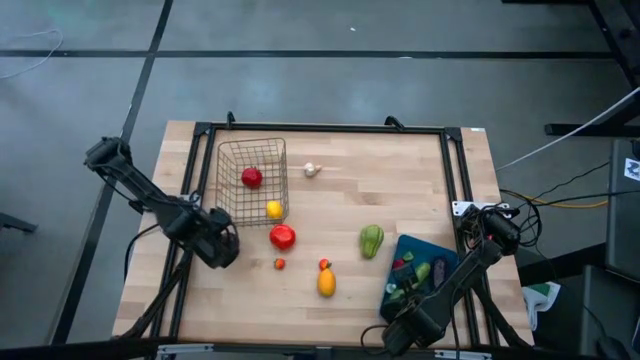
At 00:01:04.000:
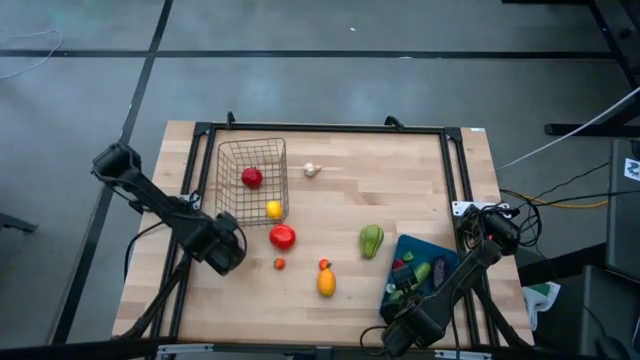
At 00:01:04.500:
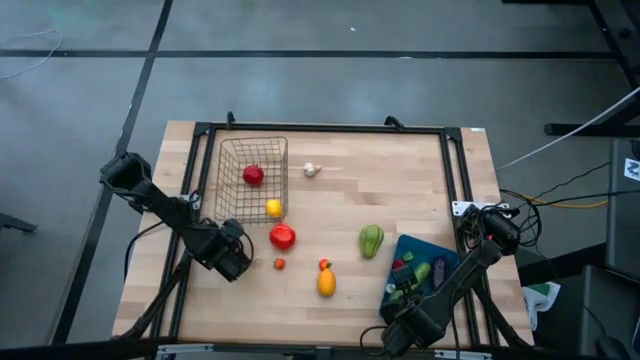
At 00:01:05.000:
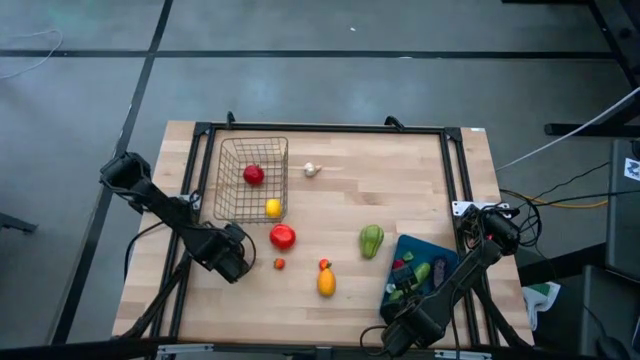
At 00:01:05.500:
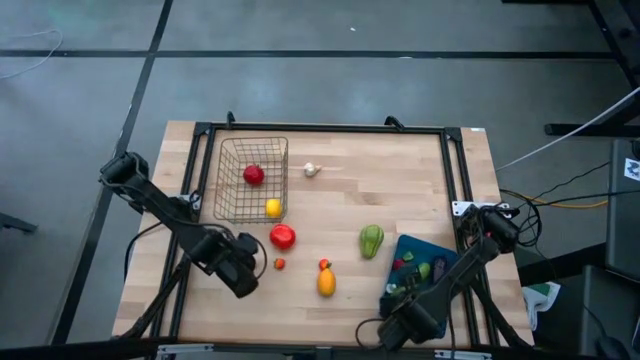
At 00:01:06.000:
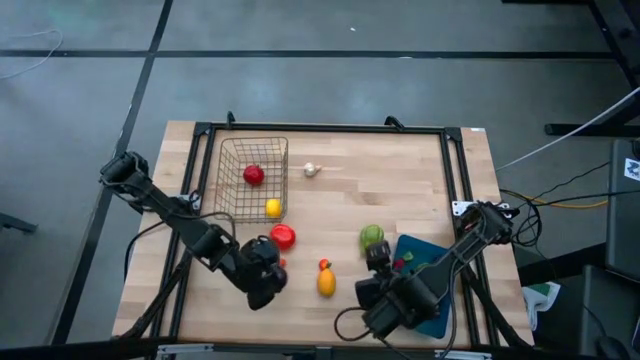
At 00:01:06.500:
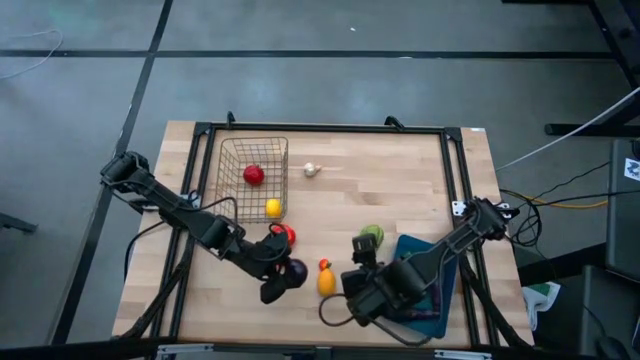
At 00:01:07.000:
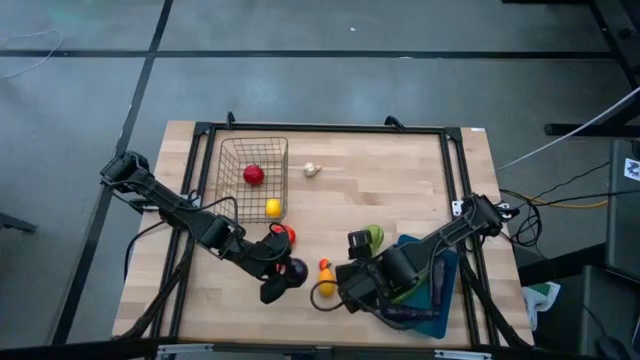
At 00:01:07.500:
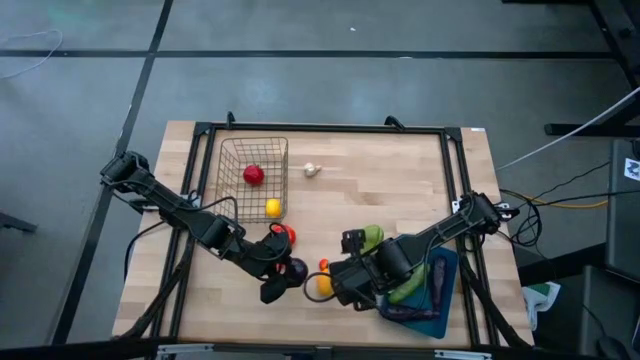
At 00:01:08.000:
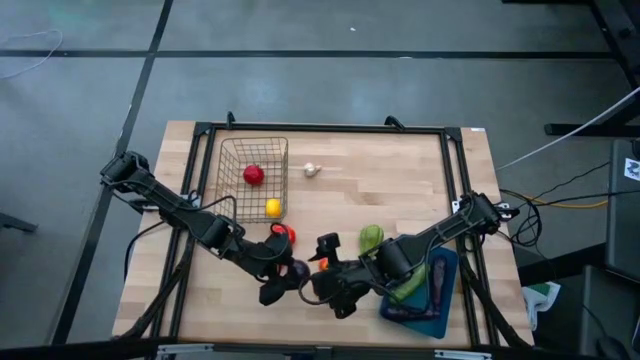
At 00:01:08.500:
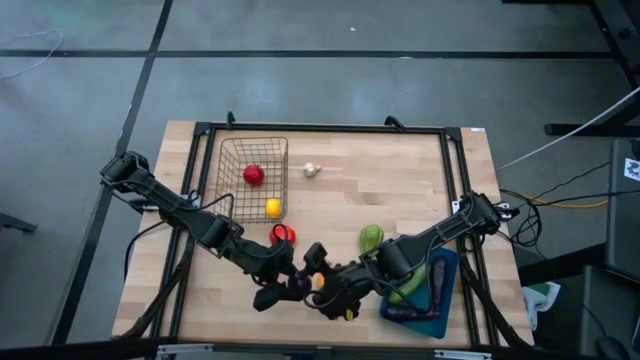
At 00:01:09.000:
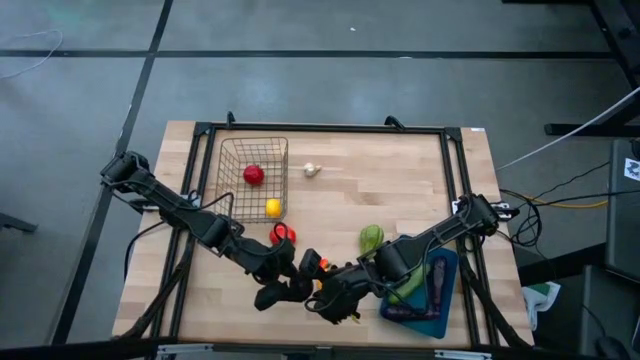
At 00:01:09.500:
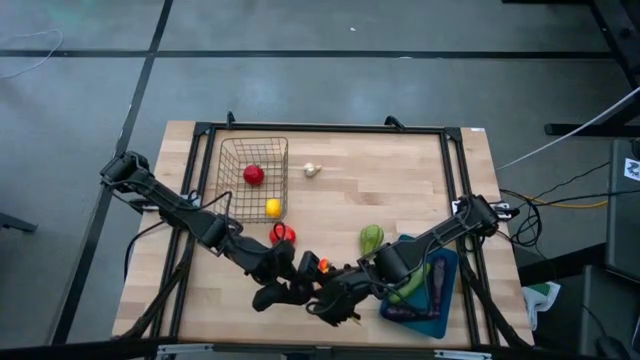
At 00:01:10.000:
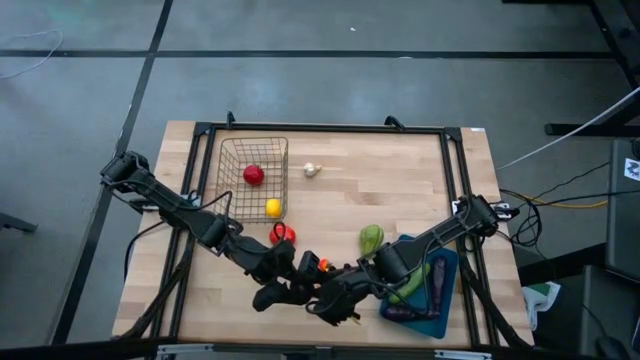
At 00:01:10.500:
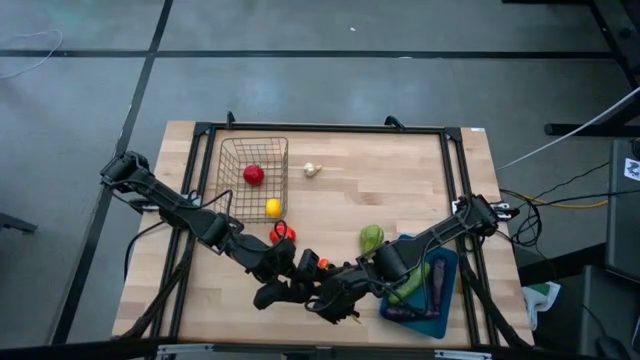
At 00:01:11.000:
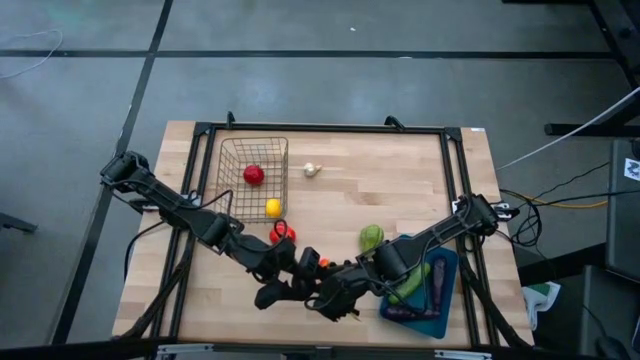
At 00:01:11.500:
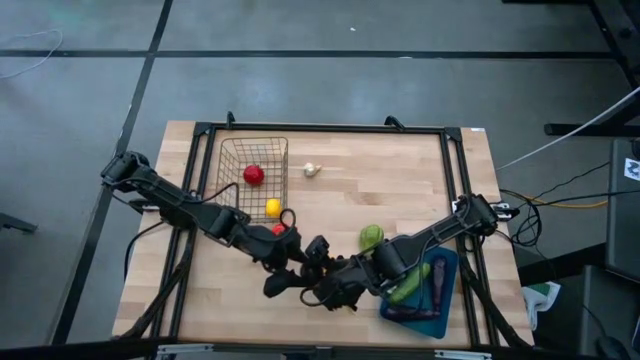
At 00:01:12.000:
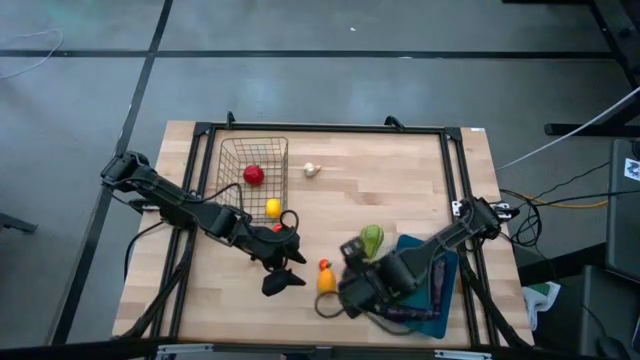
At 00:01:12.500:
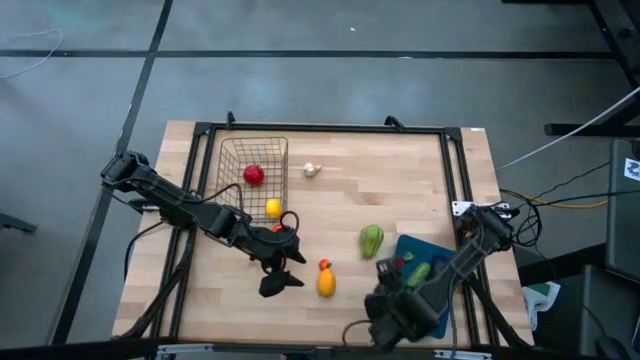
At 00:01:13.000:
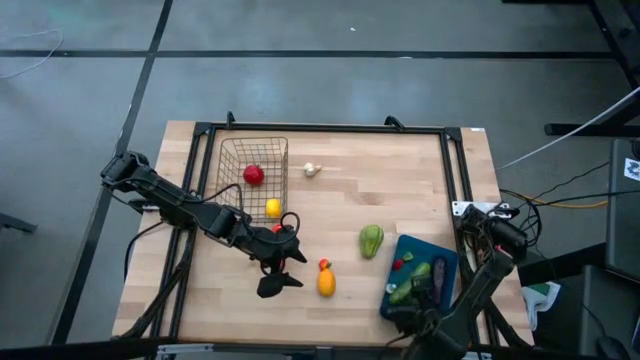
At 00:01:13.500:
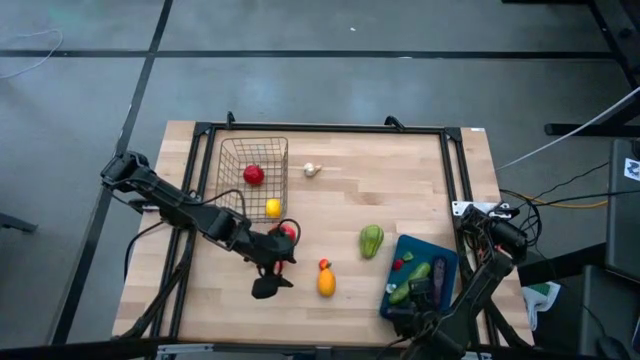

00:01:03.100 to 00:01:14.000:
Task: Sort produce into baskets
Put the violet plum into the blue bin

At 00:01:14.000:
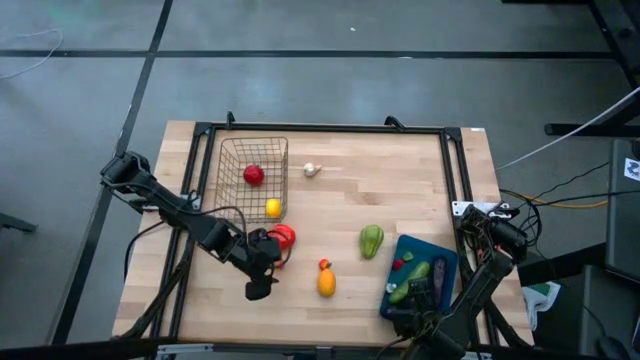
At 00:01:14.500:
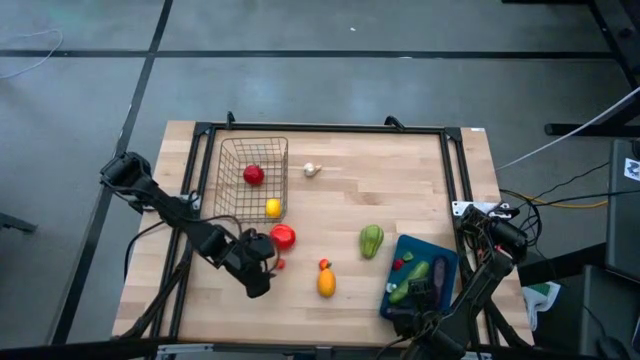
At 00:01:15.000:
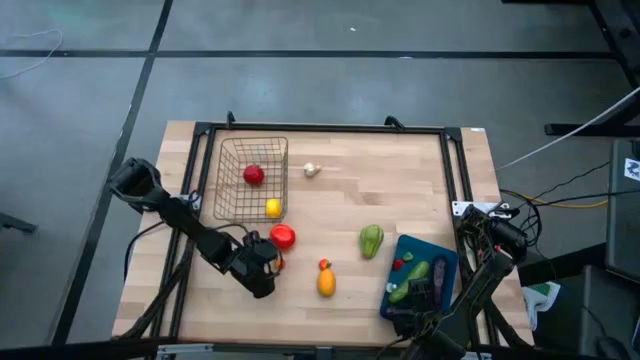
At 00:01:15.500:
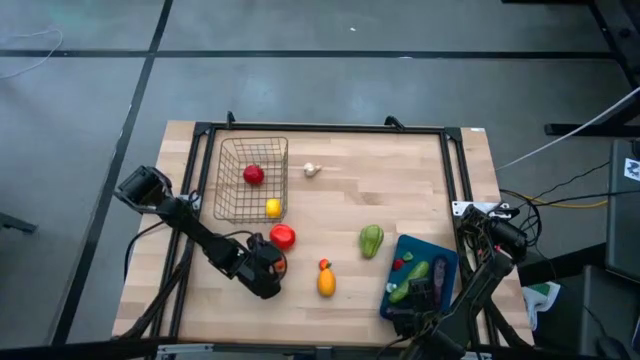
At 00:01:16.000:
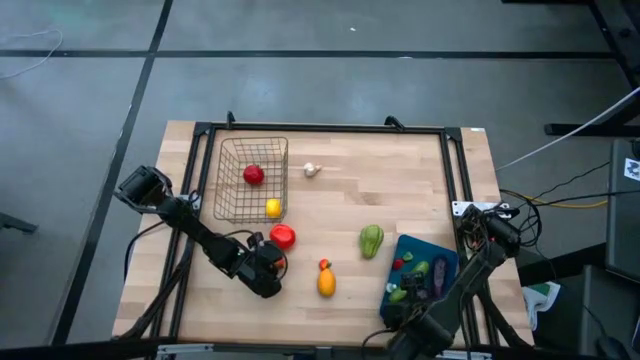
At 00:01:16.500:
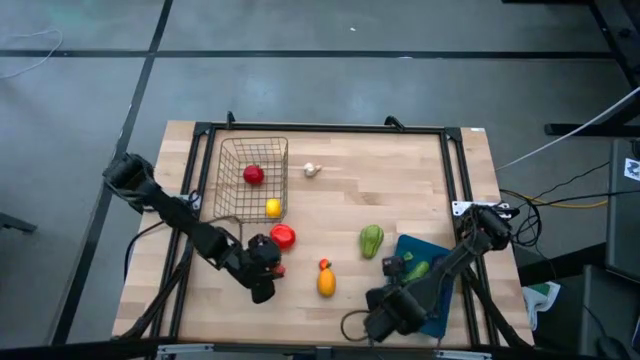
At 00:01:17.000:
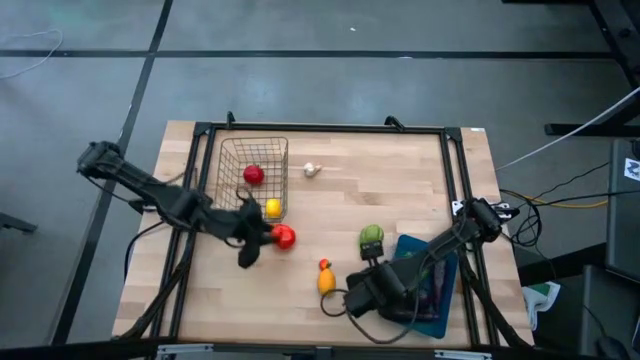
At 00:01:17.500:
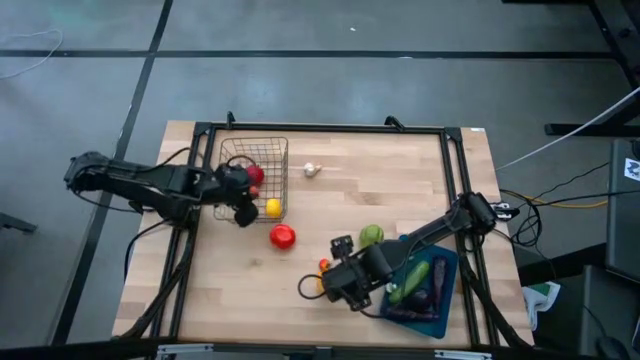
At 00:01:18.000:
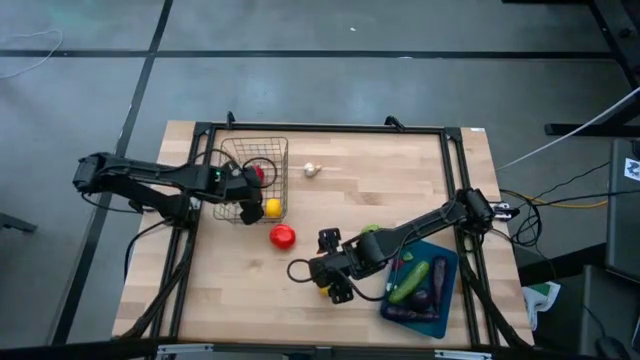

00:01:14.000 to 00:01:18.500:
Put the orange peach into the wire basket

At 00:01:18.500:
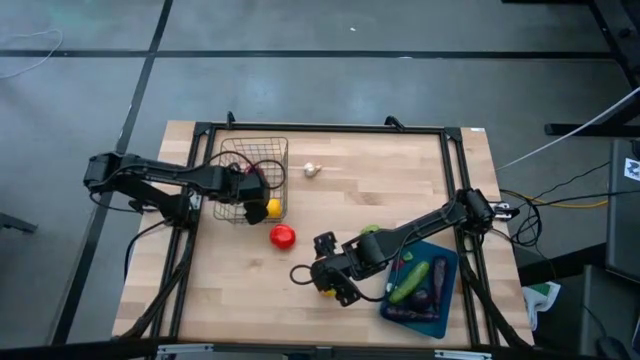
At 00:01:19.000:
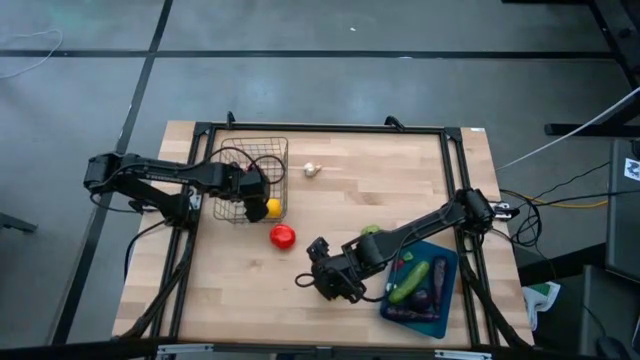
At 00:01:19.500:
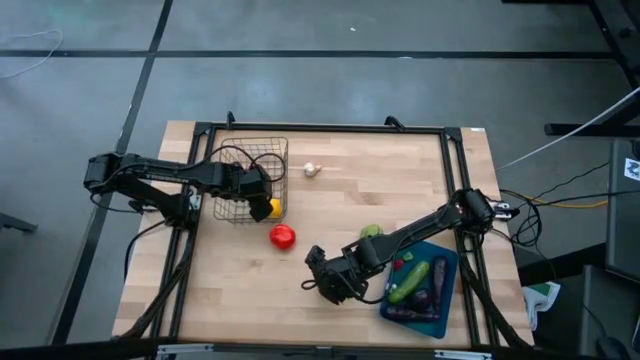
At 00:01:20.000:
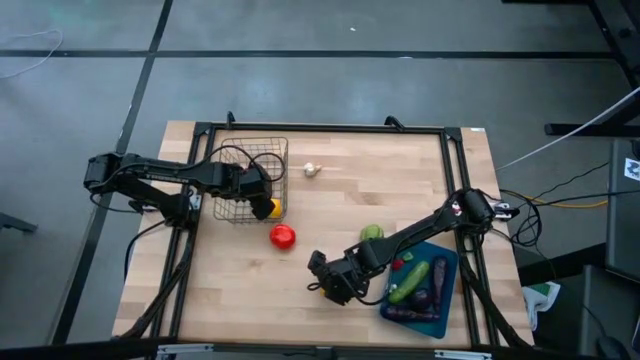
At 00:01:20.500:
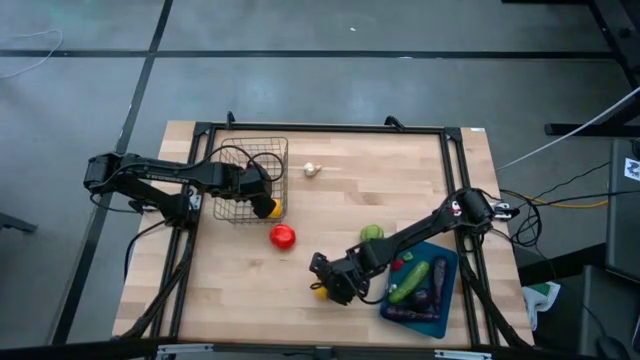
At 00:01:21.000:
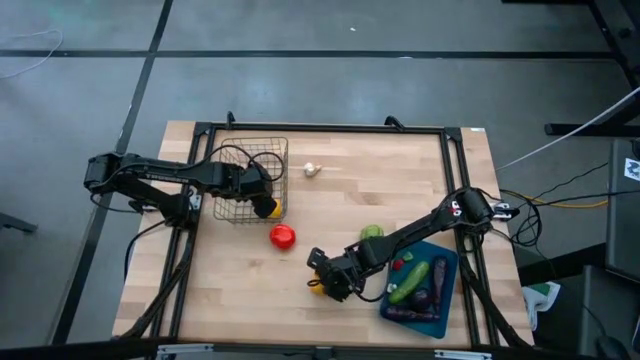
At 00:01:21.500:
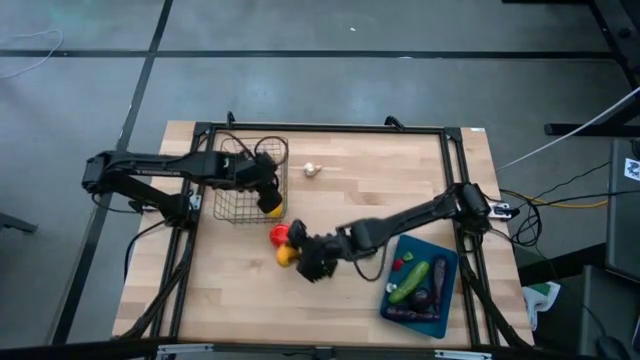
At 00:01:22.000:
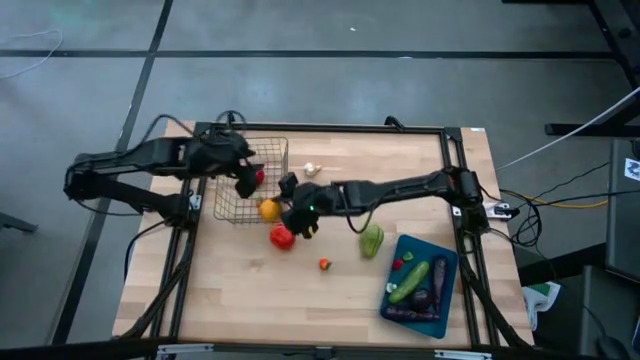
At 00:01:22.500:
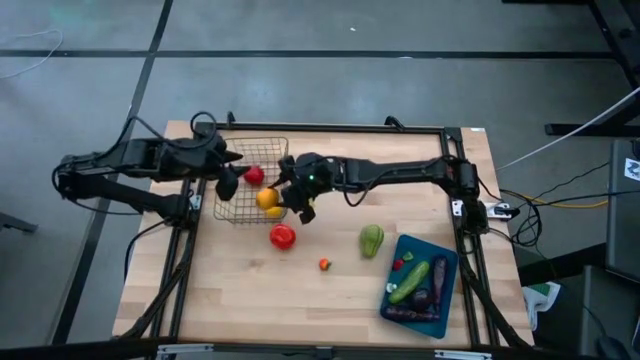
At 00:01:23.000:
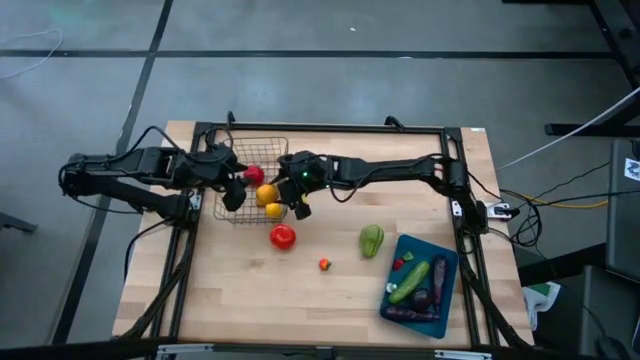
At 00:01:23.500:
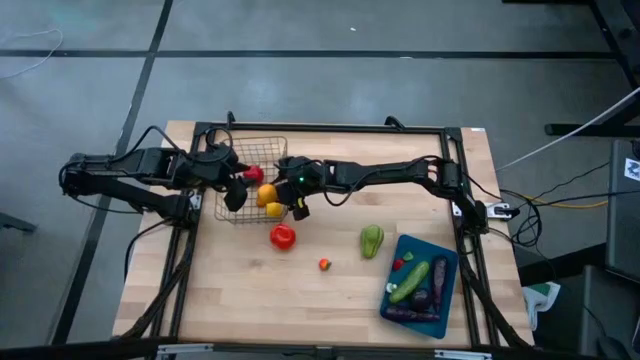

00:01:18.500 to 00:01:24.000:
Put the yellow lemon into the wire basket

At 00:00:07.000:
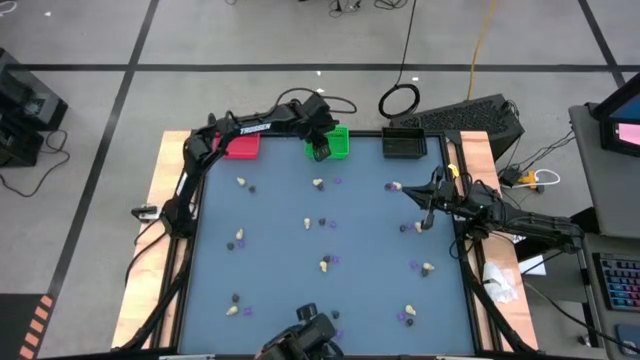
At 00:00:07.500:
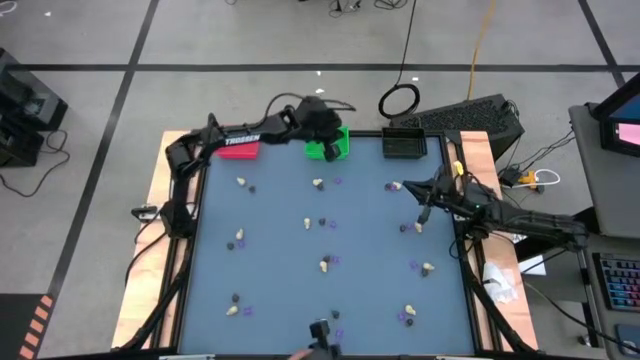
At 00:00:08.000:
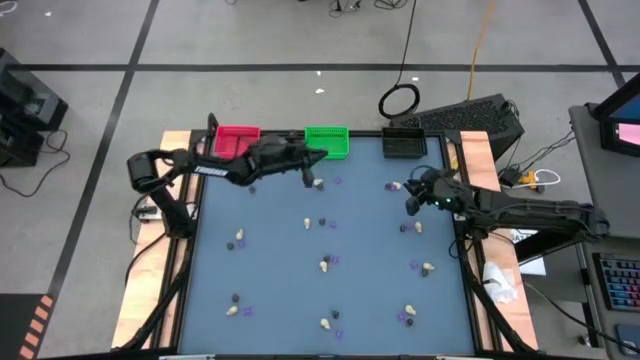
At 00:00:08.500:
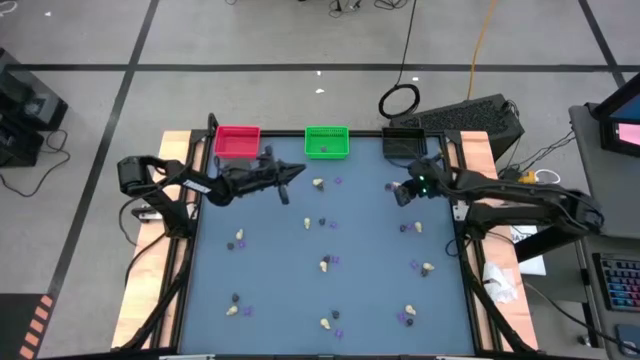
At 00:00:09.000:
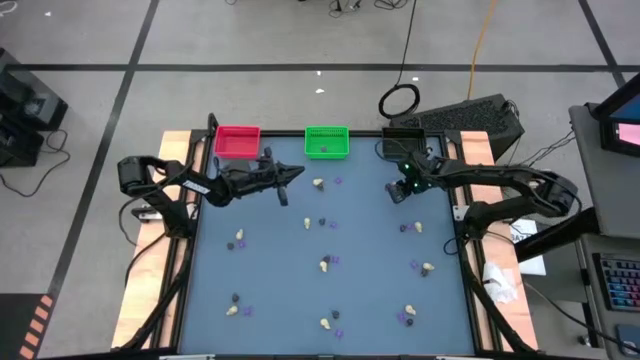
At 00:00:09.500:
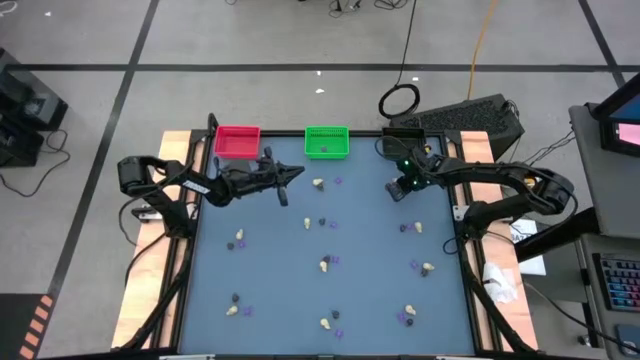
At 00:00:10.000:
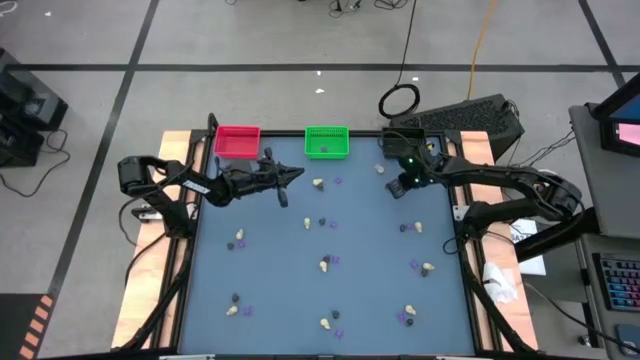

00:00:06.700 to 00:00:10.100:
Task: Sort Halloween decoration
Put the white skull toy into the black bin
